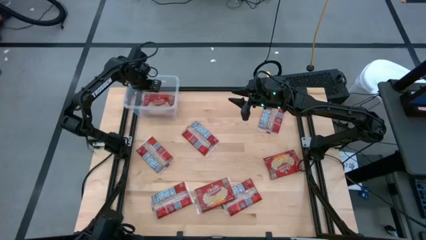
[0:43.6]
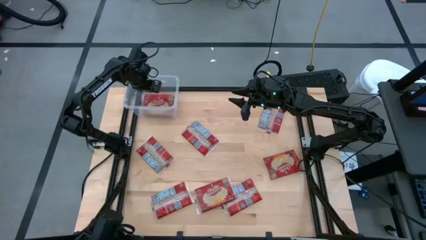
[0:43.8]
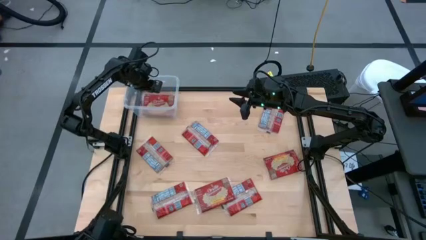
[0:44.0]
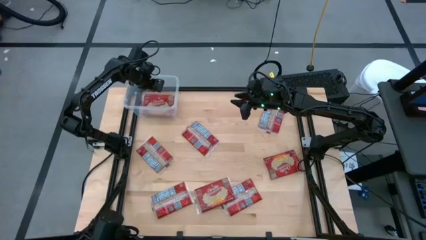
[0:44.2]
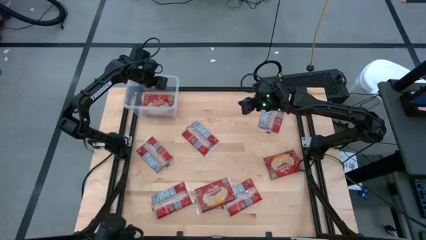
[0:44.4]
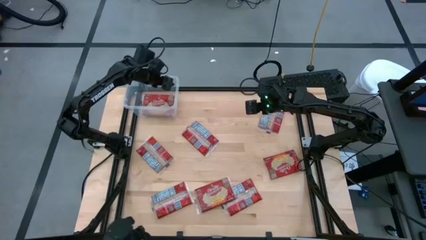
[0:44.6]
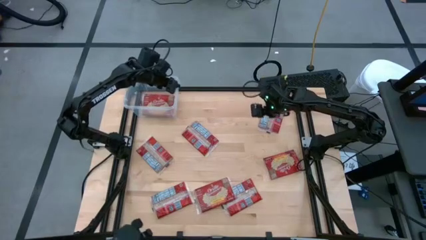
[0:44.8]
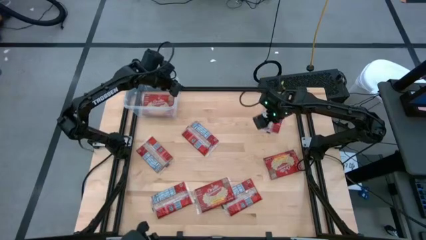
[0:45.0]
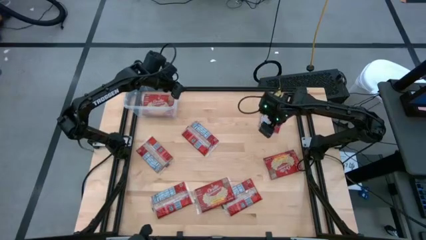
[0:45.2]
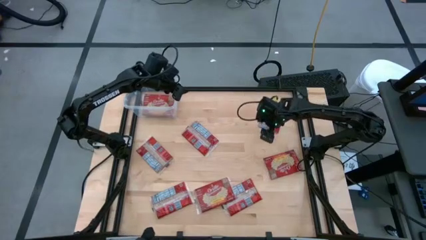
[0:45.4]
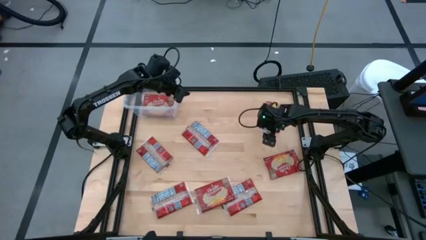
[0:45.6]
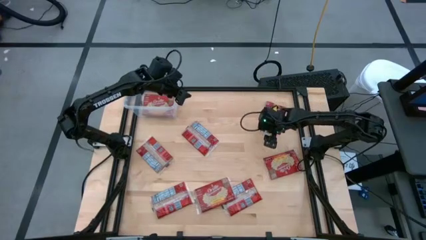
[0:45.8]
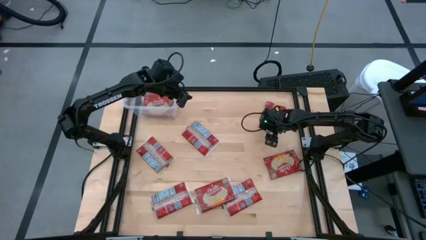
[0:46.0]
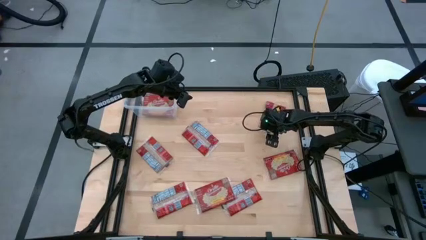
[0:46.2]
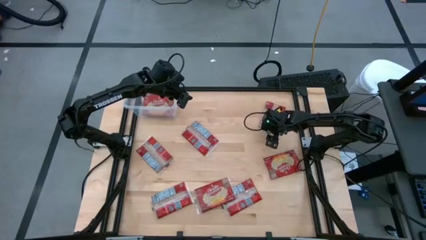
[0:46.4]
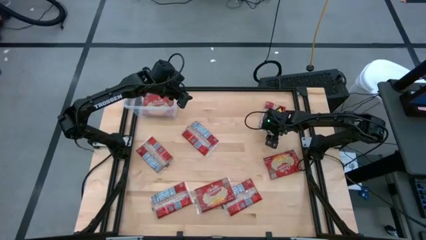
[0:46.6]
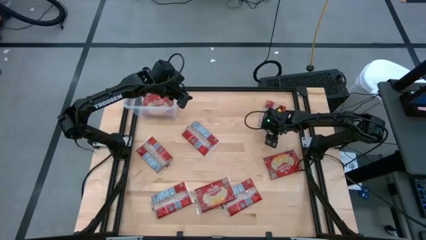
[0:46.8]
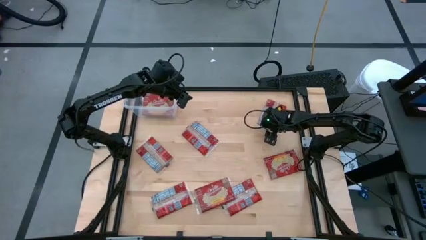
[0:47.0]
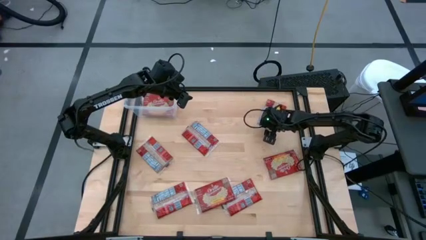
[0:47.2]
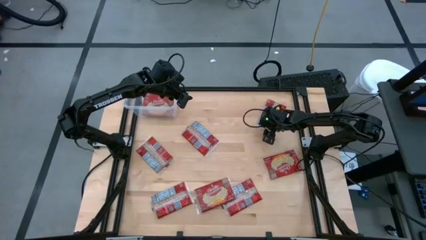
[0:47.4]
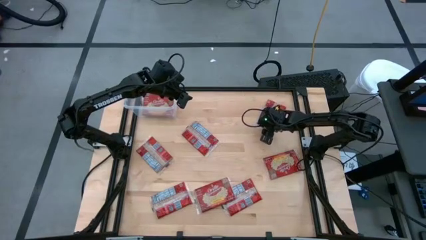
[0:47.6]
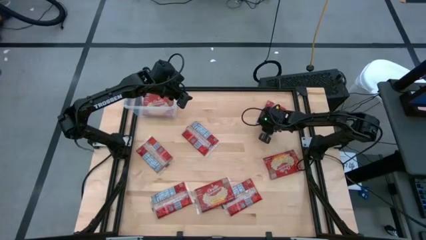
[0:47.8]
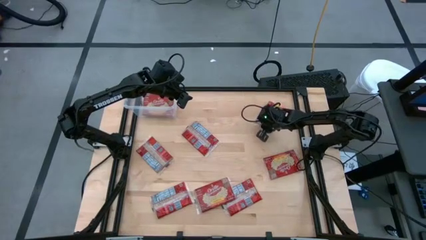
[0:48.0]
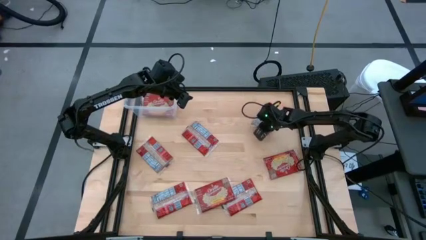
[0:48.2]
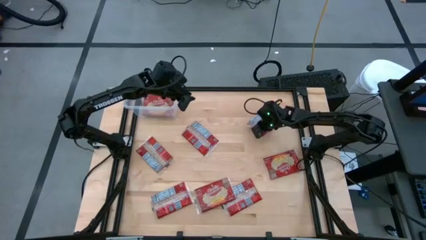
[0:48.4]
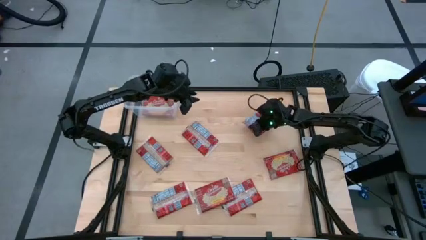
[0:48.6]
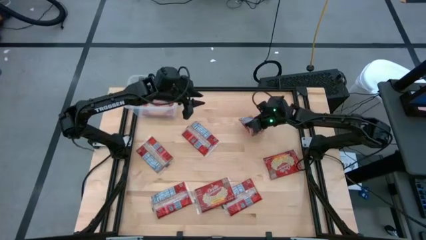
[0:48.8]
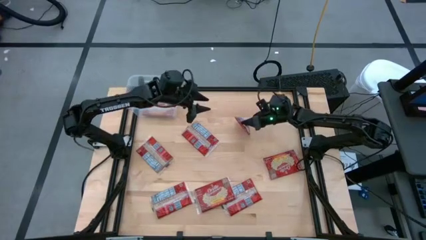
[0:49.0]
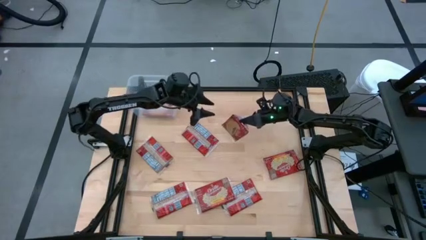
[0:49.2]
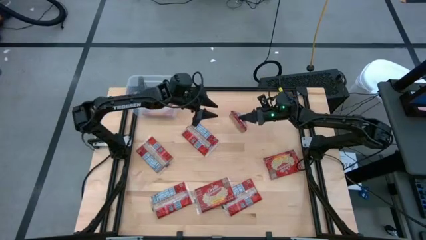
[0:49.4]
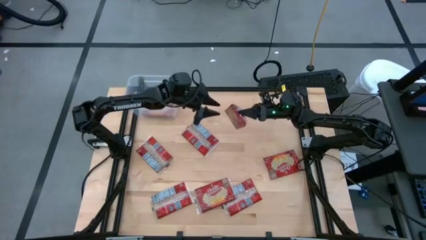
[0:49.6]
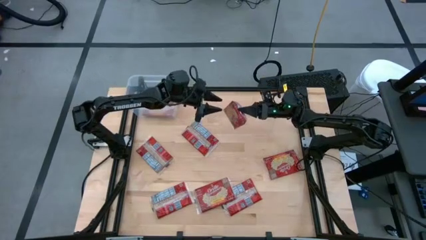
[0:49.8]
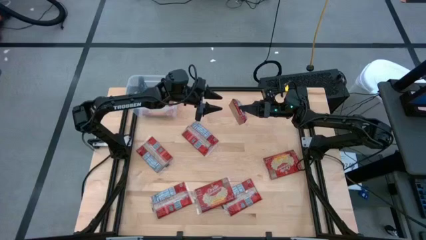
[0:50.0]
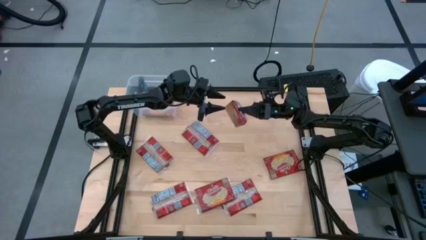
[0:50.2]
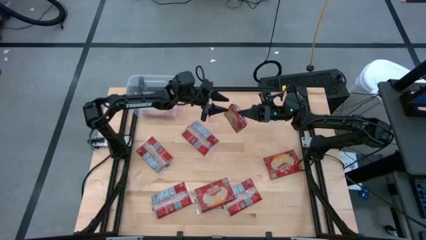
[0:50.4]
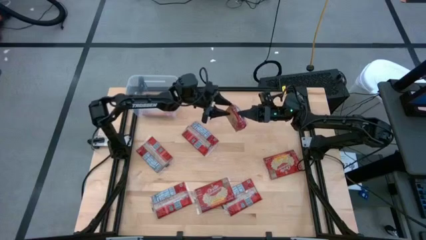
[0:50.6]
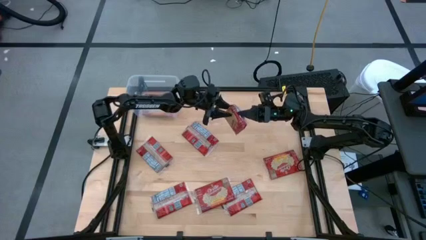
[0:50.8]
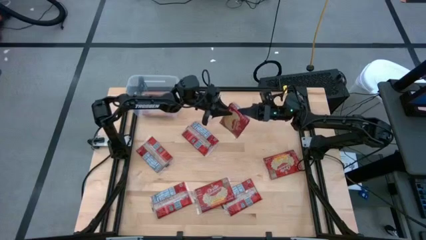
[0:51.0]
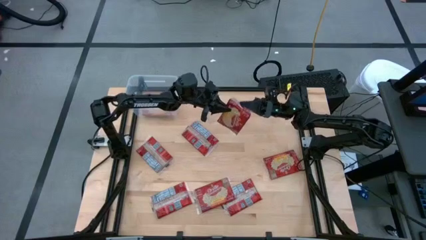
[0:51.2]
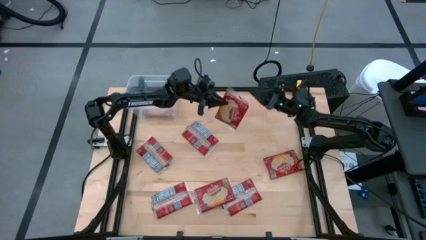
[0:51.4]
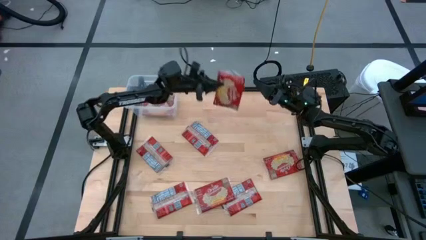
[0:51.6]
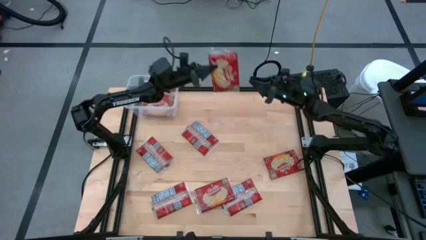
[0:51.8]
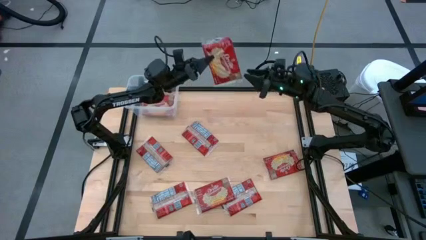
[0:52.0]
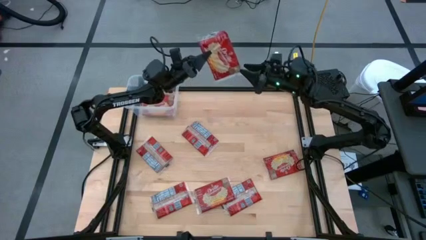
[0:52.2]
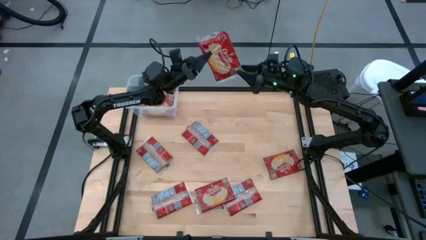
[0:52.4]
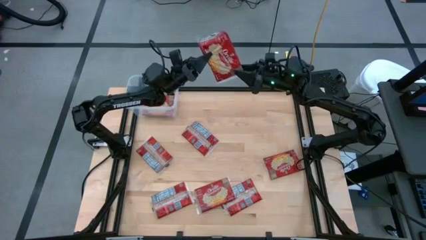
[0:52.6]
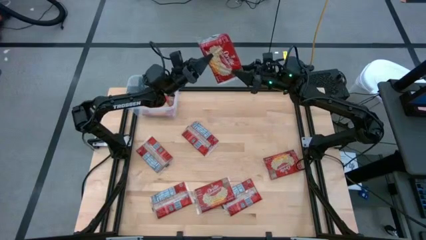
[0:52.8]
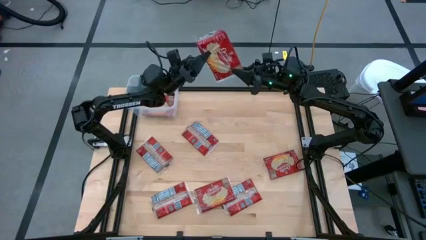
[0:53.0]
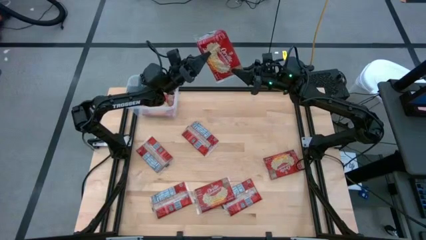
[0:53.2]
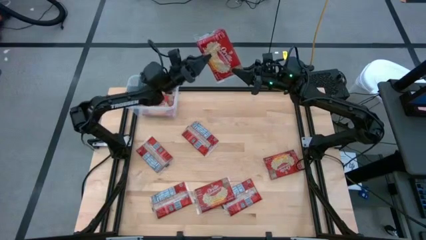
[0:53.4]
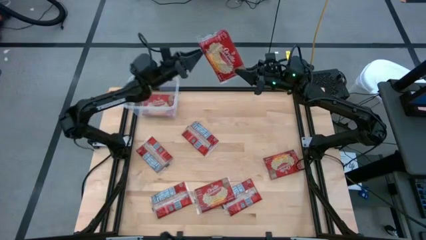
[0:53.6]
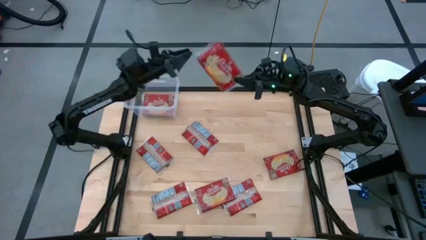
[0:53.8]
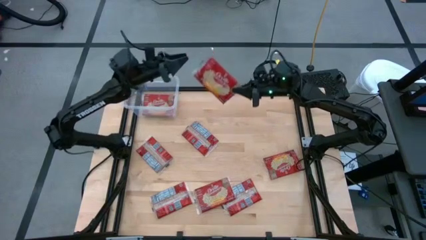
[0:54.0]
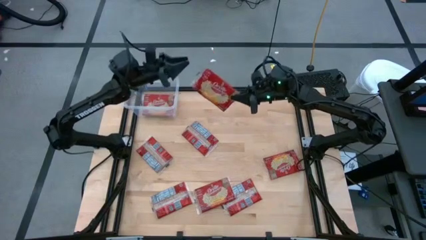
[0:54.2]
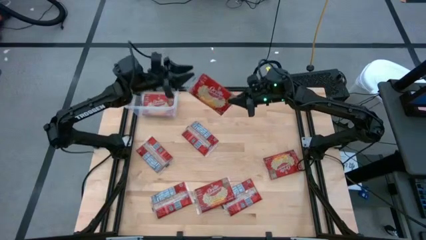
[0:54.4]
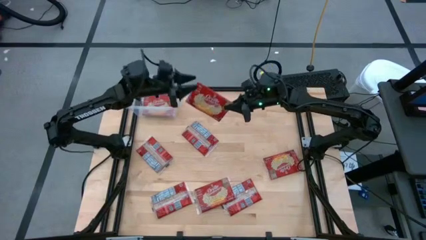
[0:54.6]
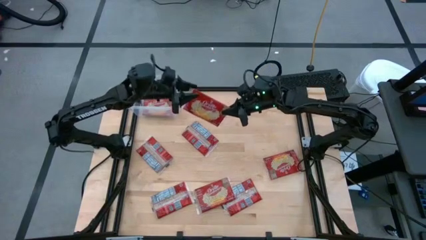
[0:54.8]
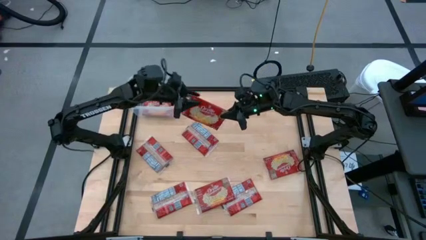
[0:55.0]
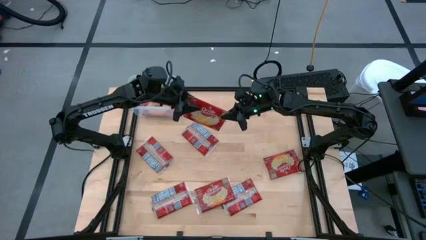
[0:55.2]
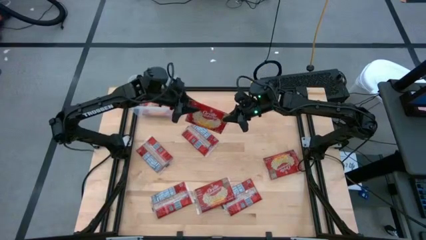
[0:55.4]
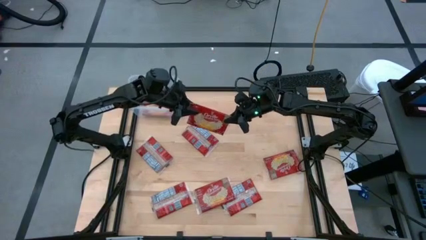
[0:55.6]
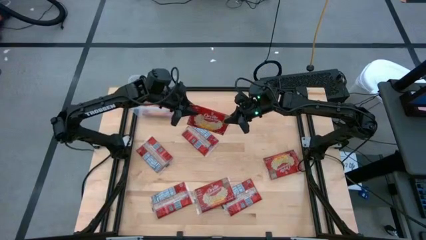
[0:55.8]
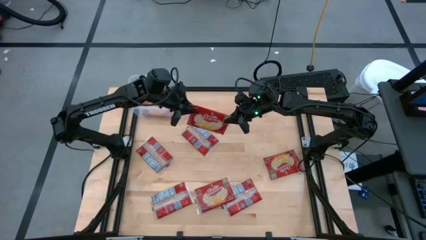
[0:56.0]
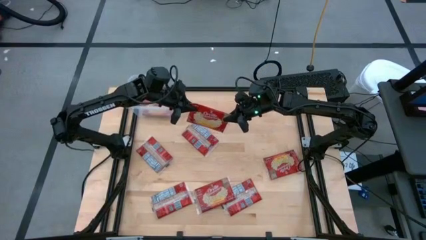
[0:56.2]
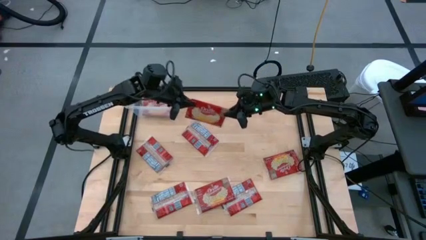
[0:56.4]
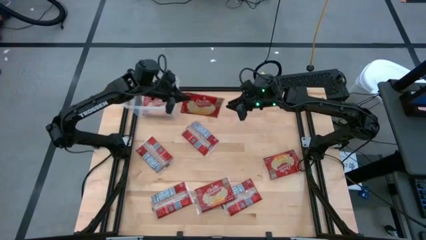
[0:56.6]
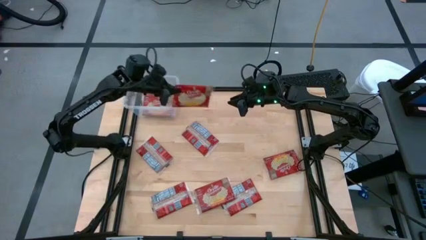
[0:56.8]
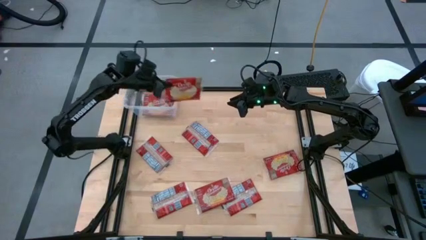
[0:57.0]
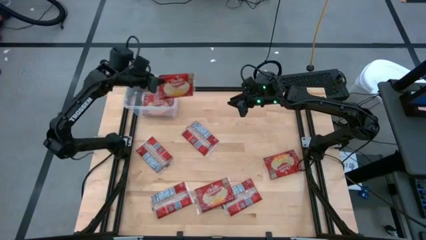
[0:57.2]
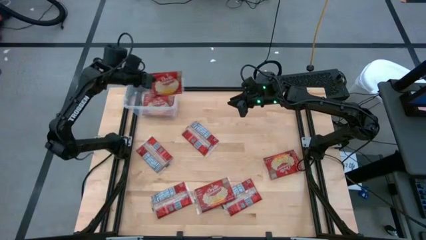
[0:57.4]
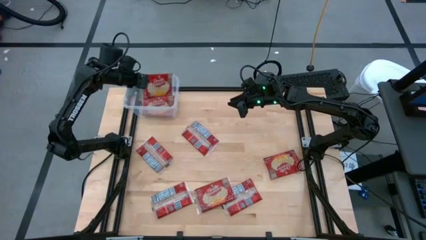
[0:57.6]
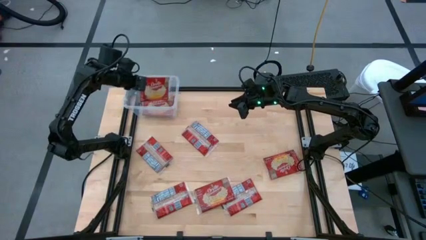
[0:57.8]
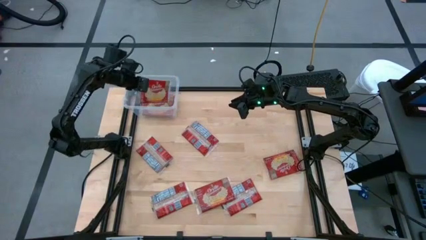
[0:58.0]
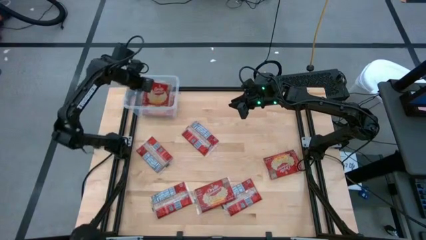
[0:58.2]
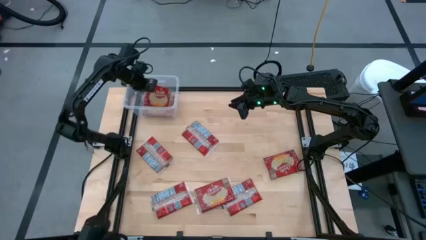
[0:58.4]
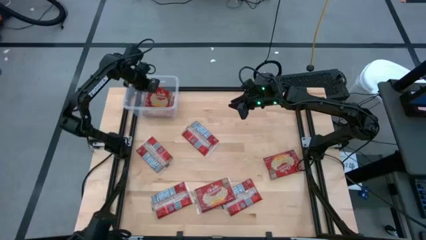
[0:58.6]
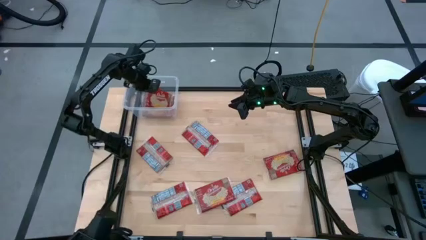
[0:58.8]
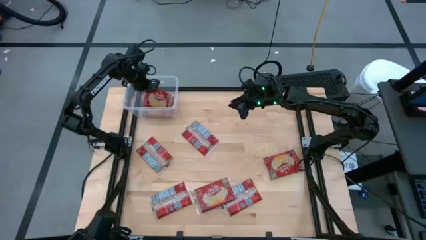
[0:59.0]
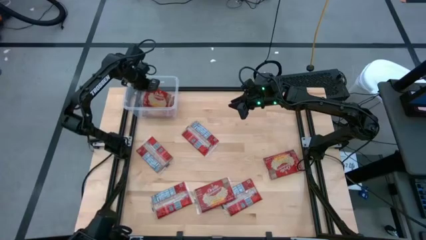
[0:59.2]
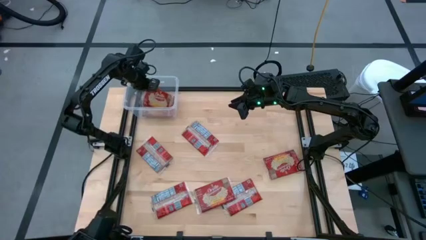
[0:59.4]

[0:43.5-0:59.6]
Task: Sort popcorn bags into baskets
Put the popcorn pack into the transparent bin
